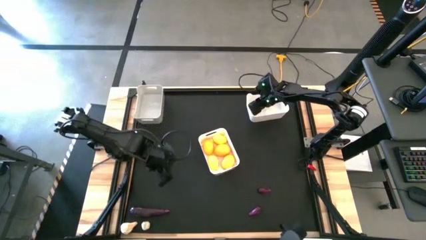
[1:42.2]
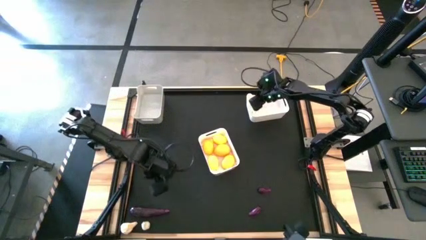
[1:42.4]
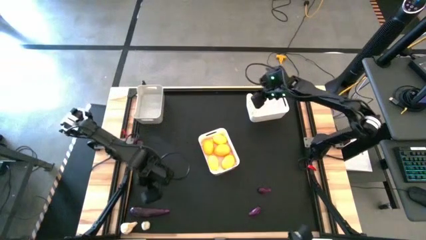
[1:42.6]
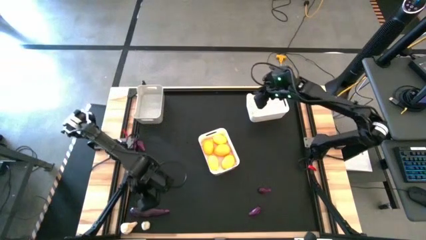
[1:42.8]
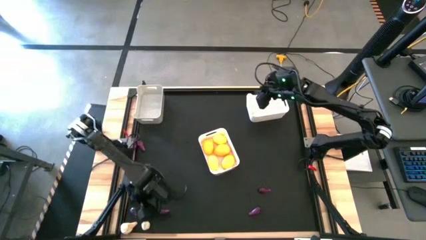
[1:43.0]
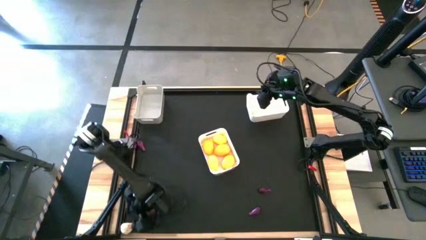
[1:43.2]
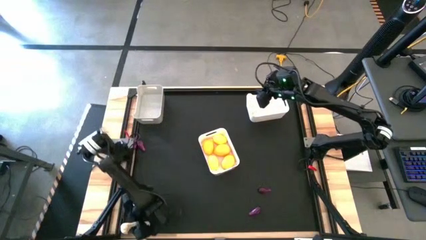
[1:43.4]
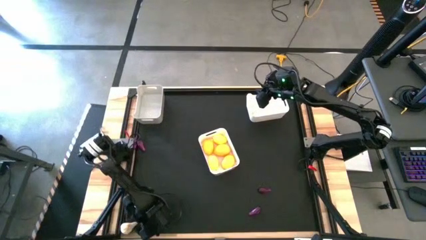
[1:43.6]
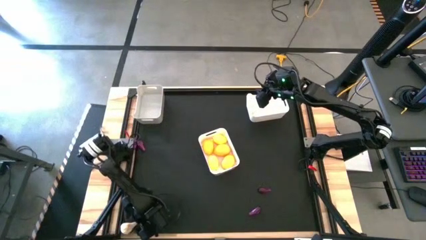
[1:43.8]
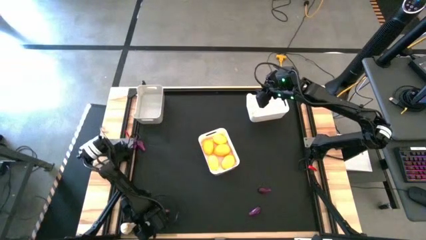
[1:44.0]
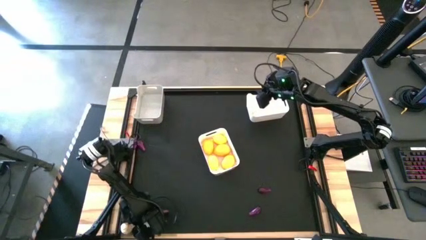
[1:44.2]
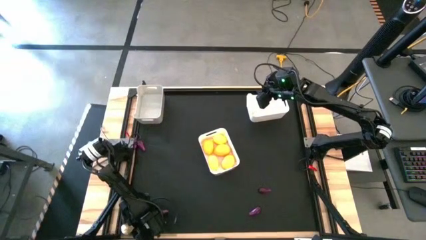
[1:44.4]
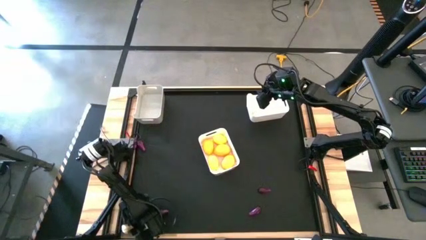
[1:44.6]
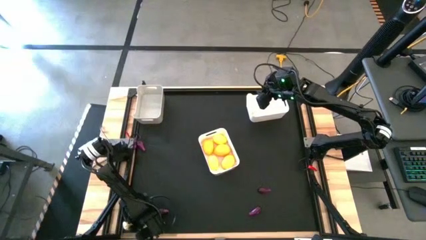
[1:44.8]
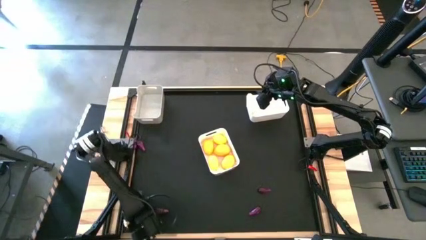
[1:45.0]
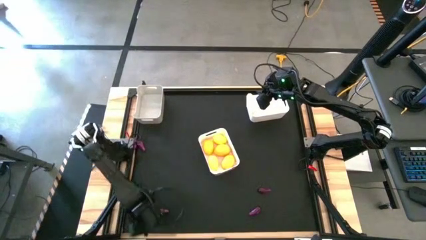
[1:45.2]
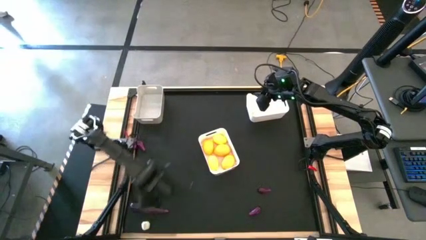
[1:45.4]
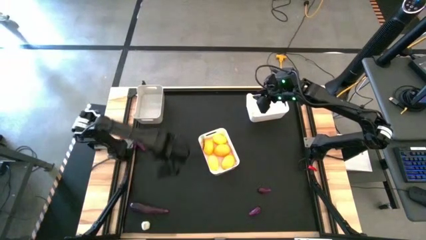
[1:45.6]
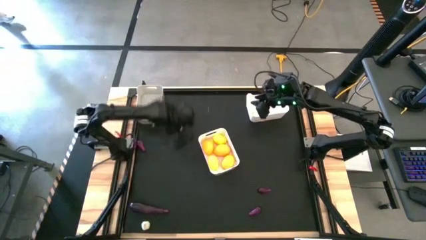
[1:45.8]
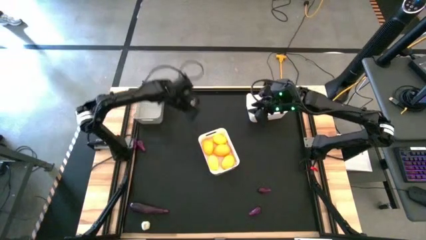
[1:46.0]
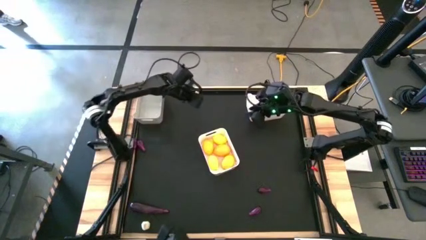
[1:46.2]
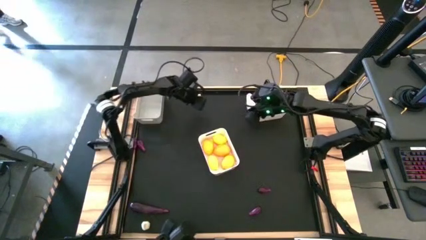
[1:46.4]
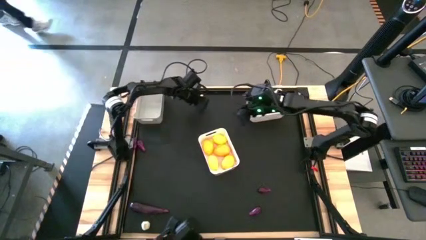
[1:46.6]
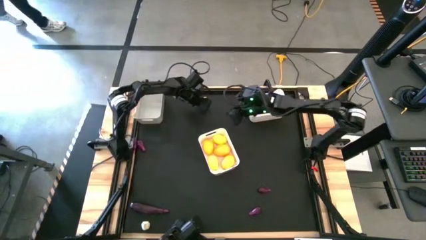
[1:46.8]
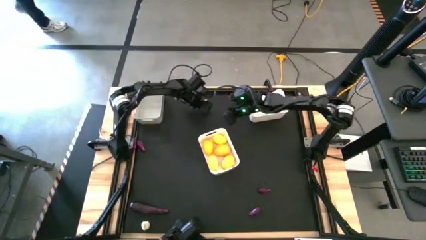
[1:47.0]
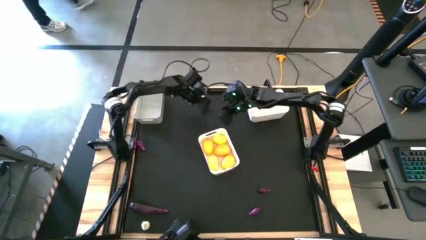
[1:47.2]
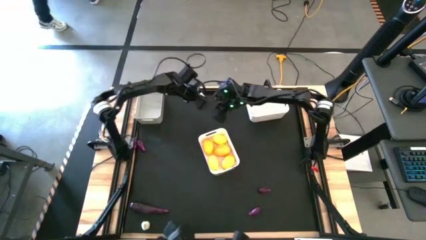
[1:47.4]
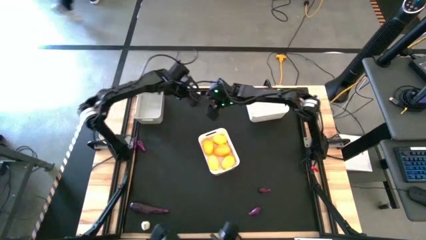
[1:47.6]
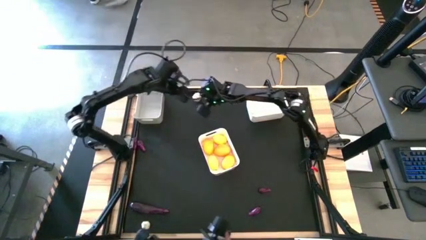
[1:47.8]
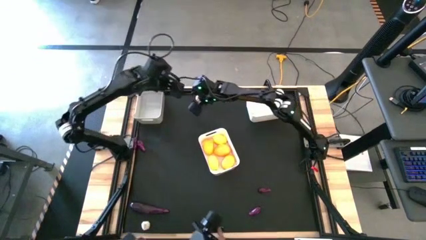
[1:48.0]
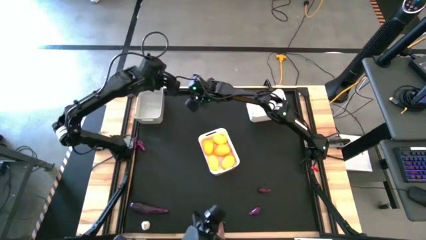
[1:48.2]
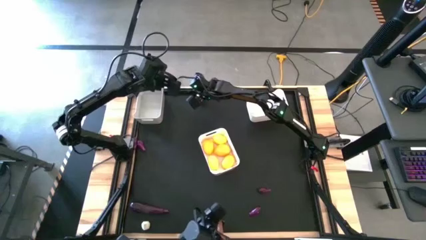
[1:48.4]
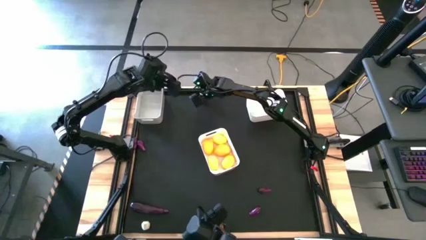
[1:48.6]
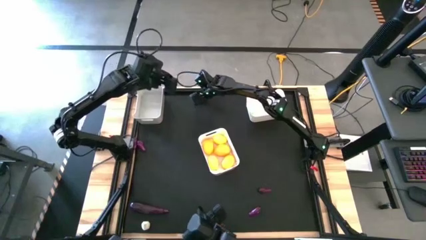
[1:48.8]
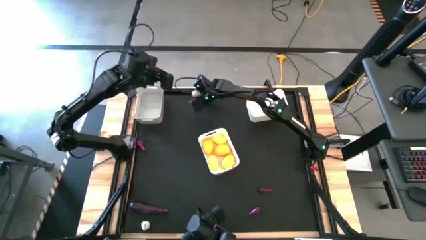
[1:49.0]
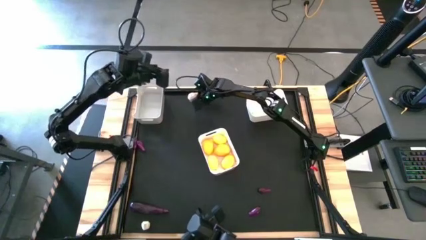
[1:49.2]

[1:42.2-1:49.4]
Task: Sort produce into baskets
Put the garlic into the top white bin

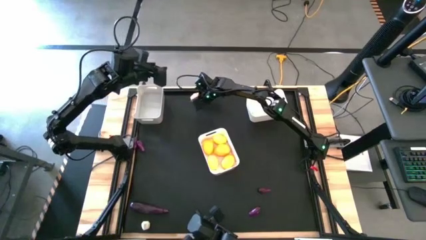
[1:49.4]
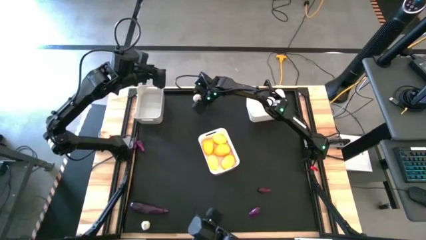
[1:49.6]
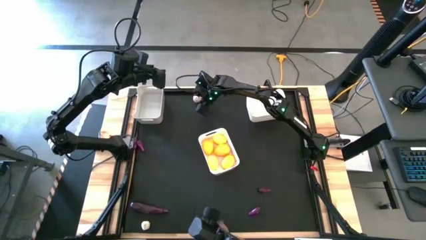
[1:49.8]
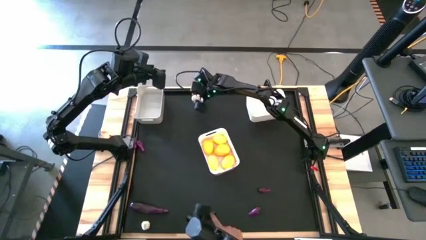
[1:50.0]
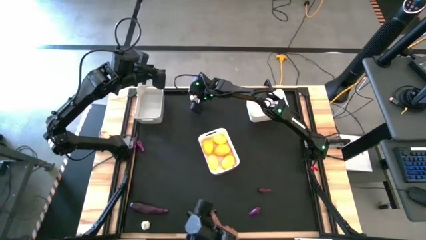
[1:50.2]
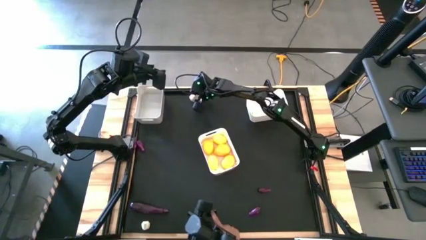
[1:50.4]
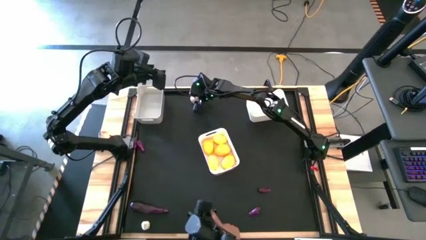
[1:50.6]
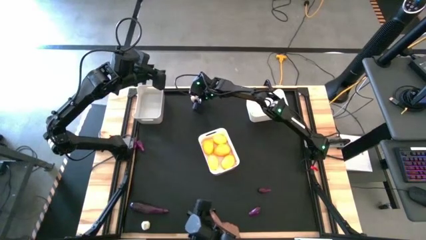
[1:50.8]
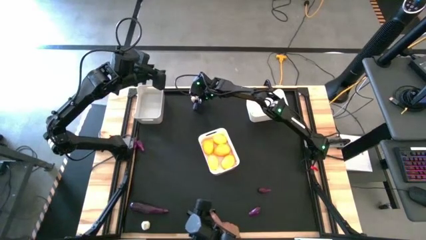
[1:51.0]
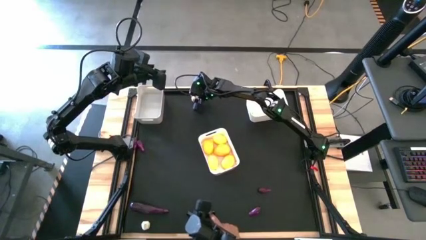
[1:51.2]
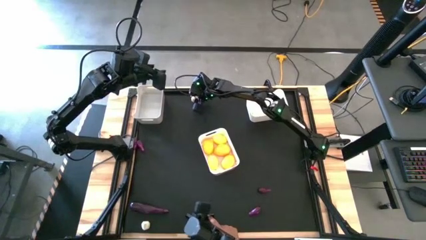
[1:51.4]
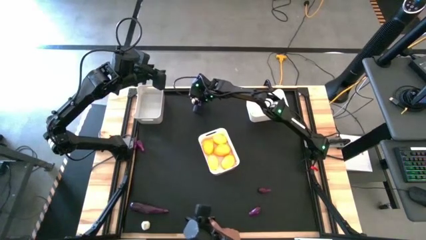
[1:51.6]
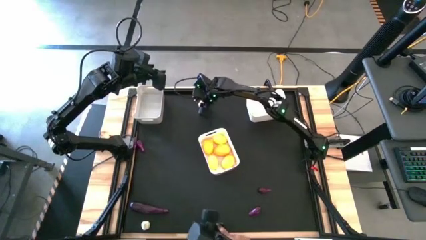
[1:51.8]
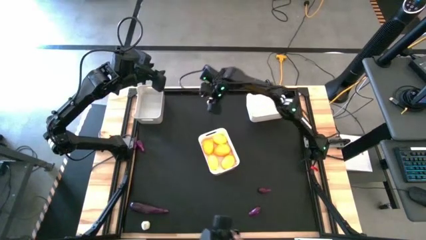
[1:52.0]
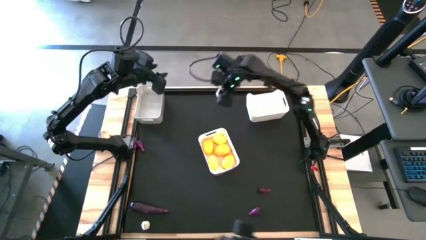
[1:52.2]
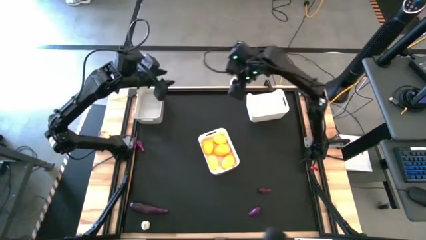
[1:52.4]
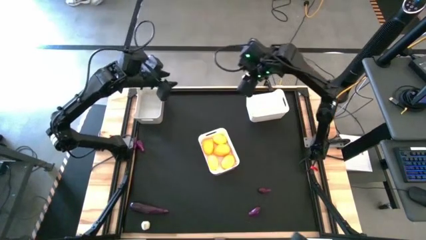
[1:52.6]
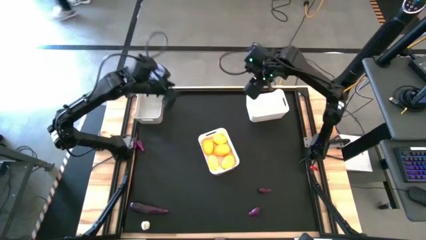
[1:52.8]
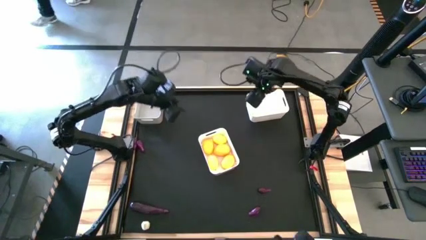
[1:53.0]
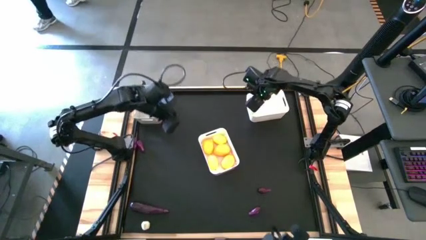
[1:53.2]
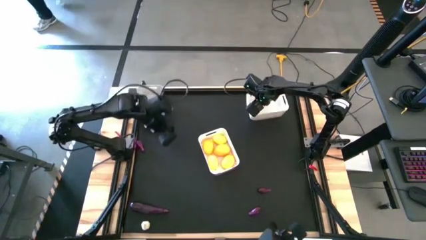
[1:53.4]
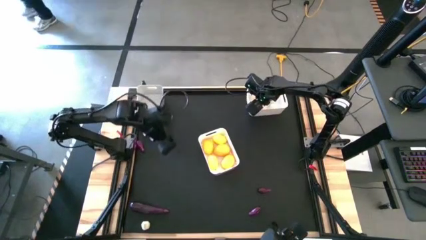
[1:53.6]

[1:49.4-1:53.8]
Put the garlic into the top white bin

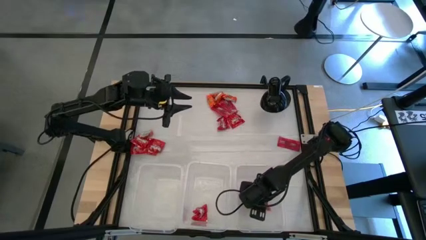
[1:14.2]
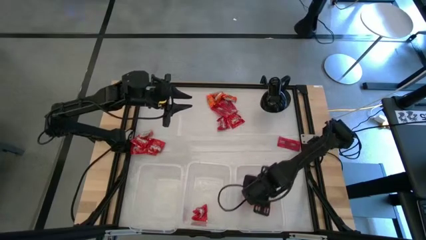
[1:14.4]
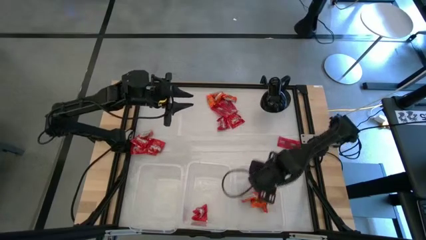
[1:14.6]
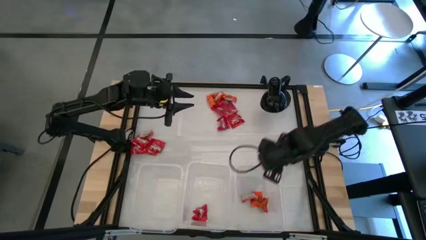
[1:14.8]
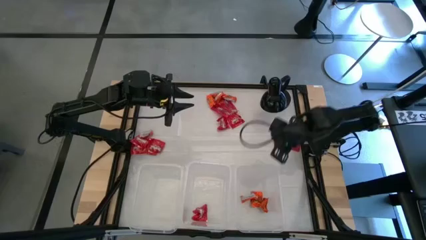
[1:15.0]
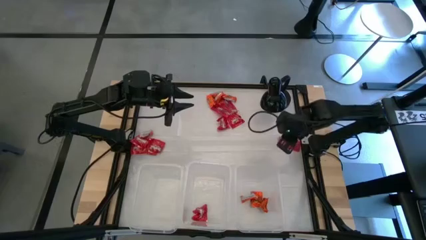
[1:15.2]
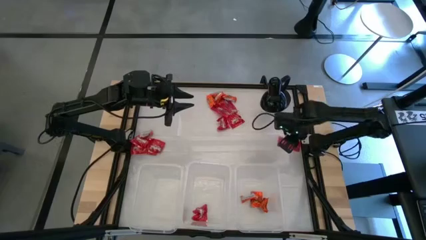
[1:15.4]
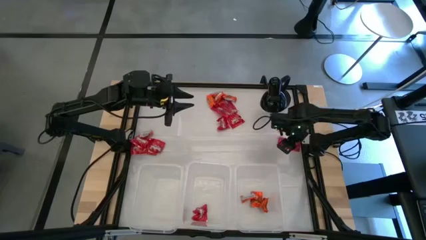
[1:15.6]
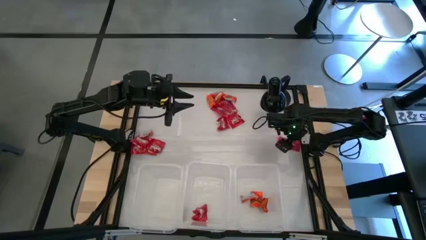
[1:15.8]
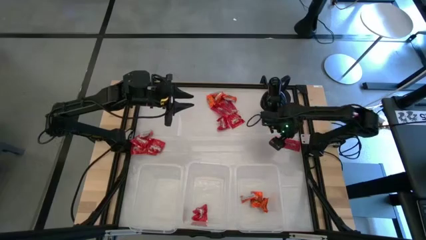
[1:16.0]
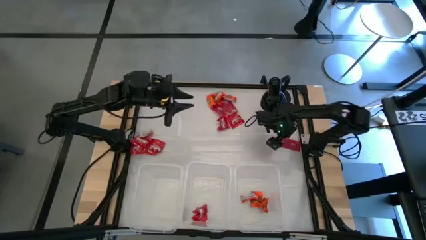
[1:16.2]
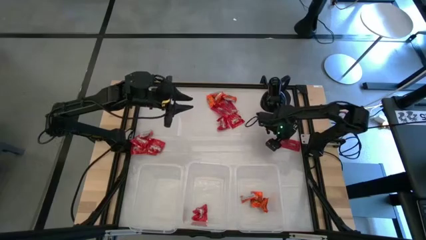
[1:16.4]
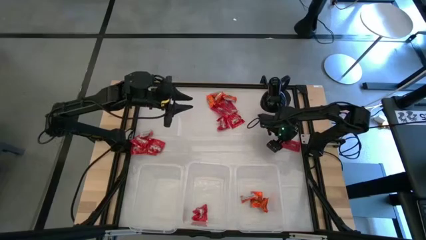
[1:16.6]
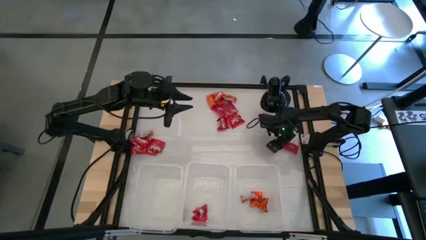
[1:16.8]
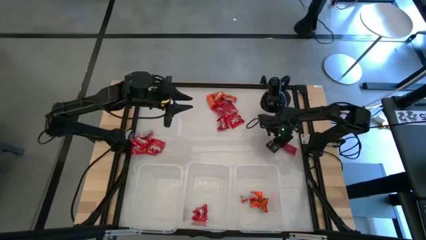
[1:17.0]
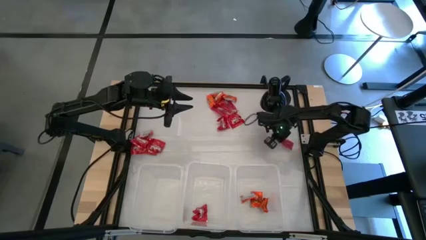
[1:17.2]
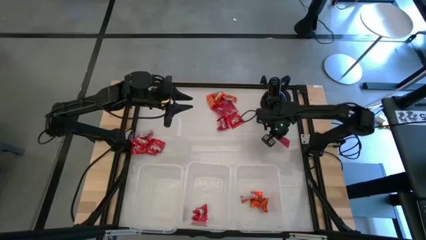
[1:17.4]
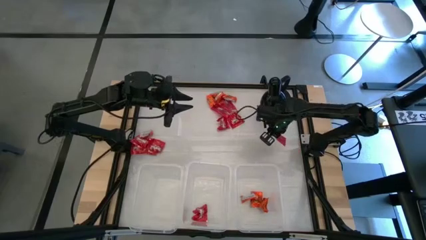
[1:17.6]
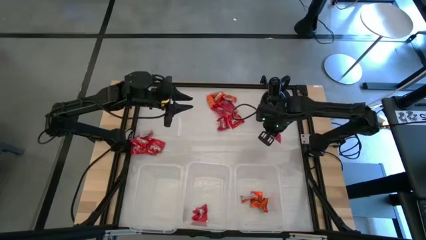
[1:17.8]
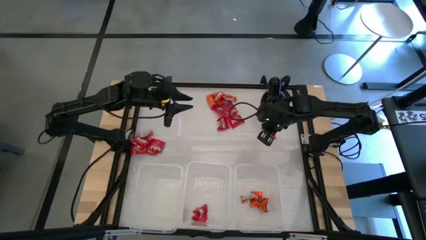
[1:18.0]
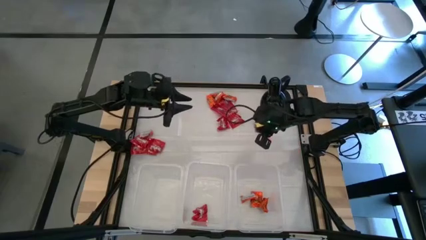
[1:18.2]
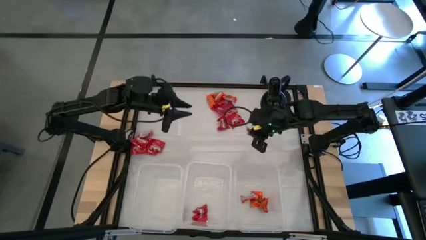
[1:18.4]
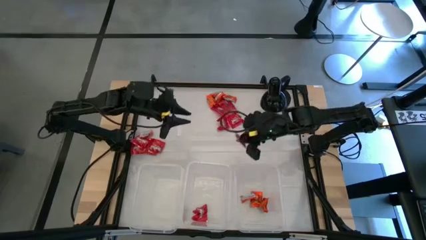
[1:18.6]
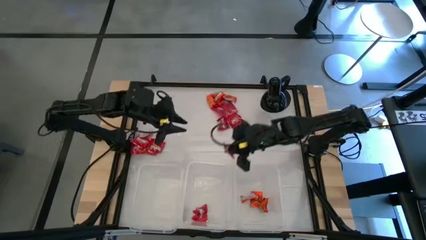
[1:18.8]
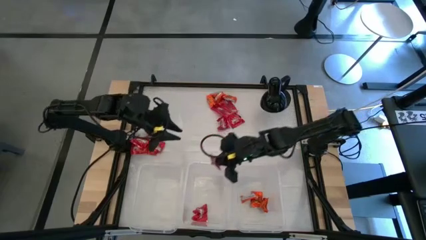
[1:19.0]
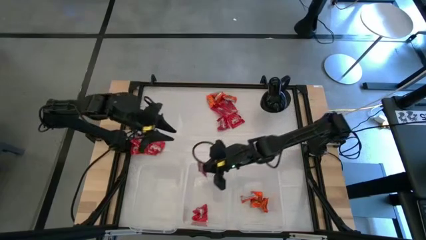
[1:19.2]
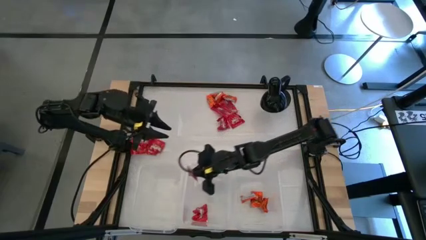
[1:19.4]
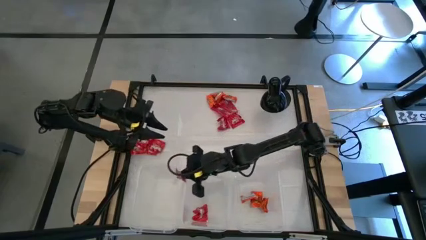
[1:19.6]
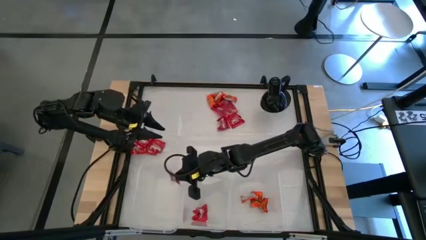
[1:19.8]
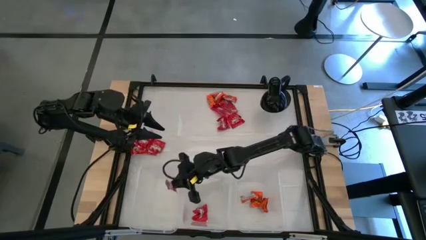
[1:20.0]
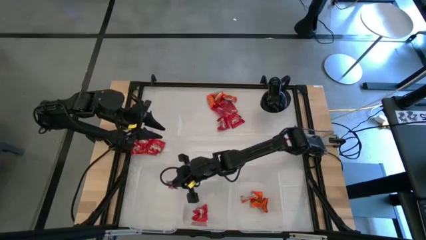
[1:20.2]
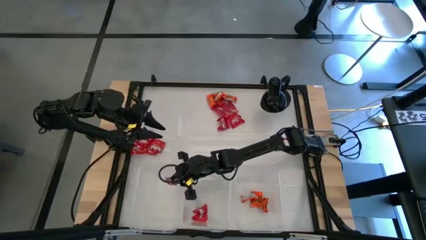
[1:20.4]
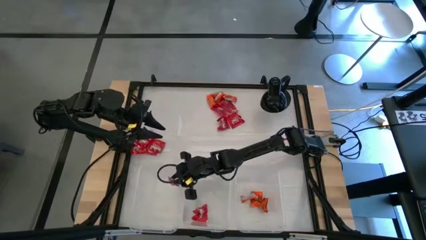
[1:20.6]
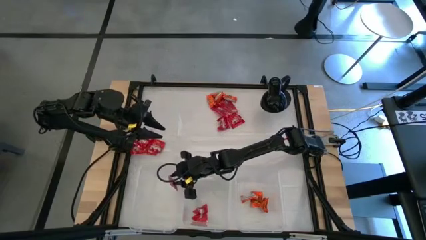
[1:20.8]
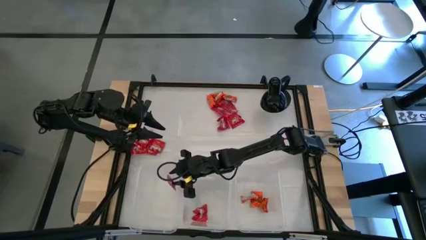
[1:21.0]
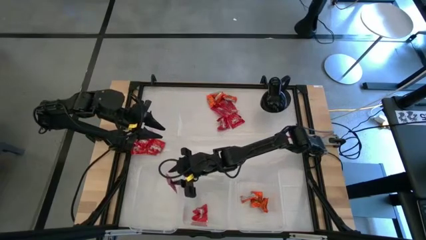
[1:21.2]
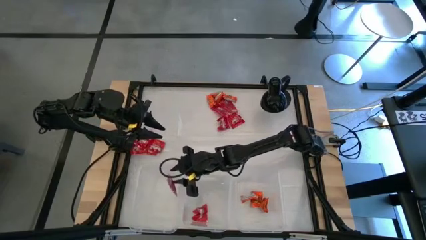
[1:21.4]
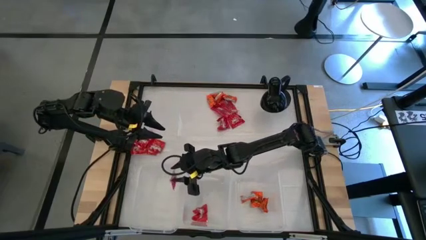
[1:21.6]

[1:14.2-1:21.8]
Task: Sort candy
Put the light red candy into the left transparent bin
